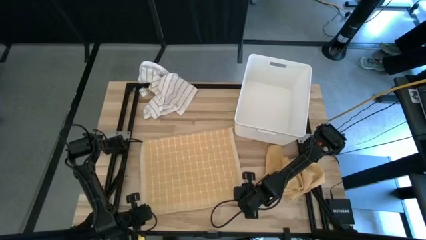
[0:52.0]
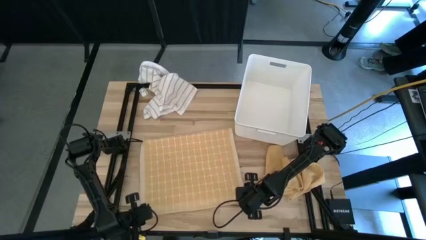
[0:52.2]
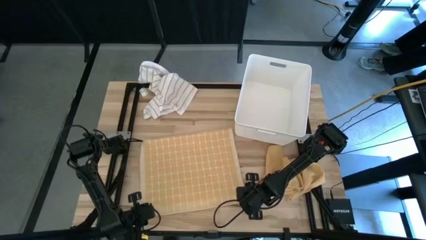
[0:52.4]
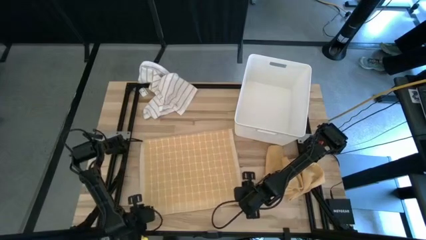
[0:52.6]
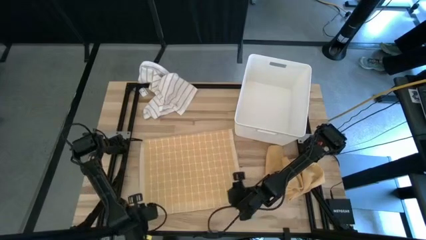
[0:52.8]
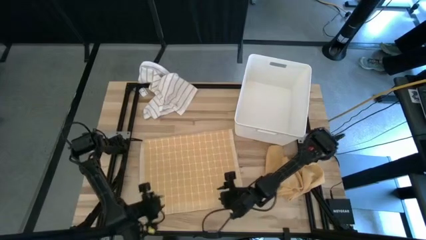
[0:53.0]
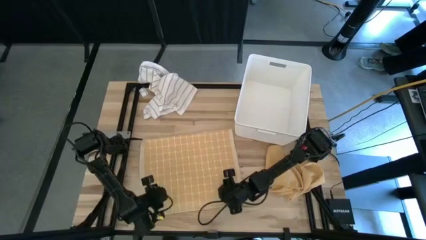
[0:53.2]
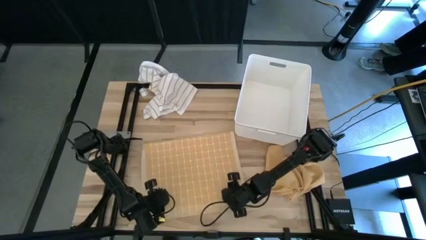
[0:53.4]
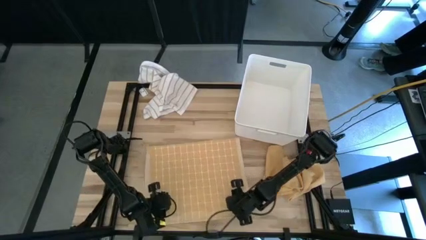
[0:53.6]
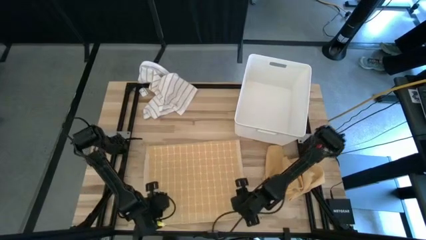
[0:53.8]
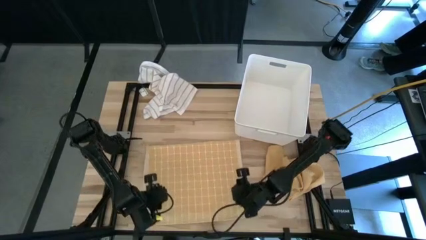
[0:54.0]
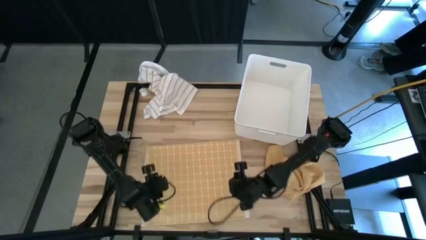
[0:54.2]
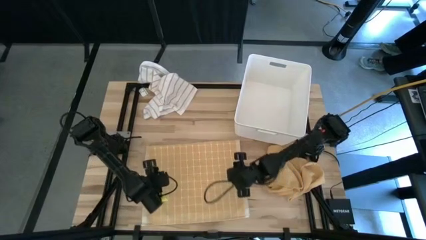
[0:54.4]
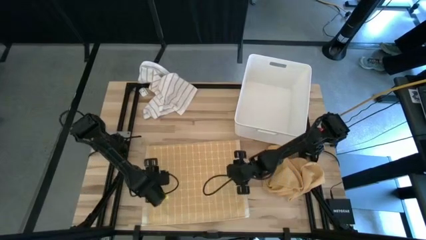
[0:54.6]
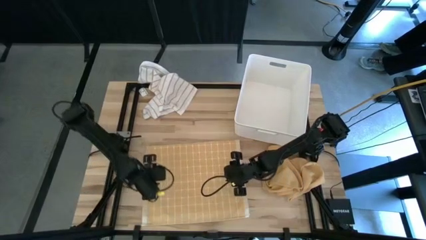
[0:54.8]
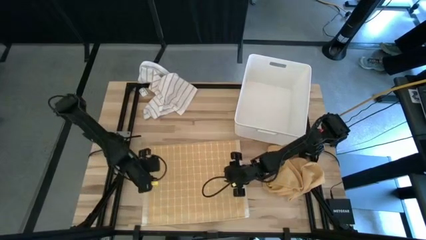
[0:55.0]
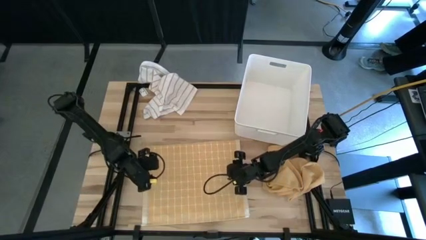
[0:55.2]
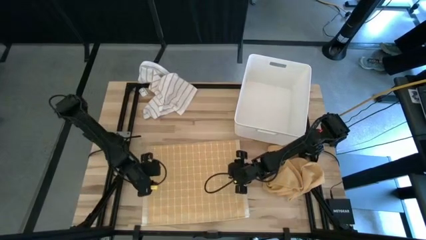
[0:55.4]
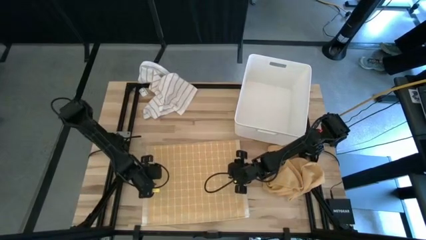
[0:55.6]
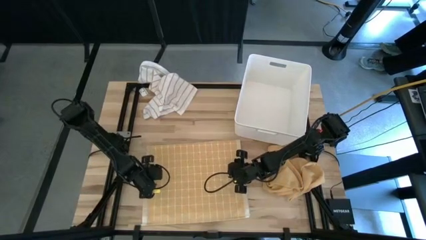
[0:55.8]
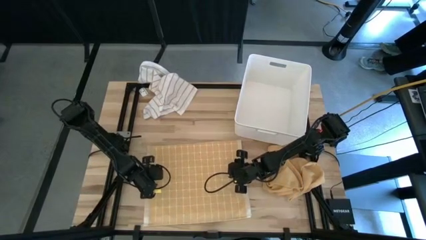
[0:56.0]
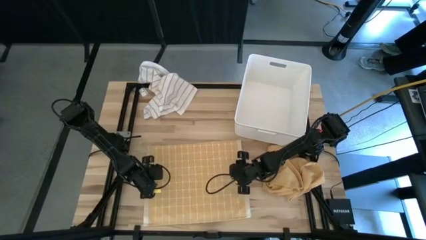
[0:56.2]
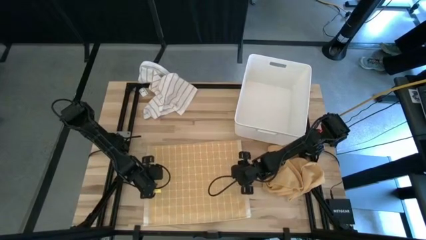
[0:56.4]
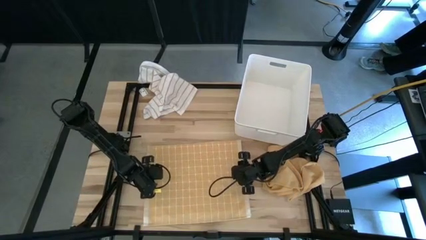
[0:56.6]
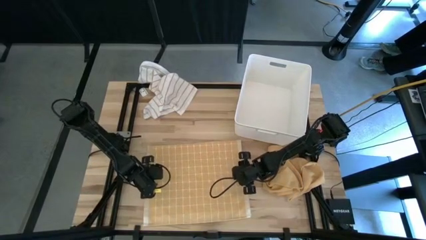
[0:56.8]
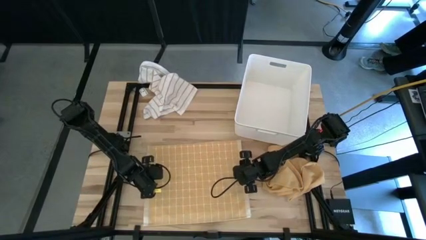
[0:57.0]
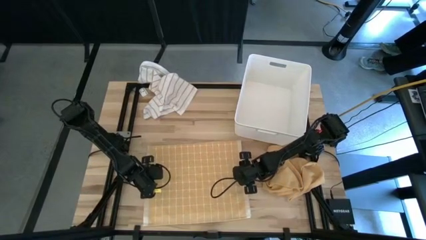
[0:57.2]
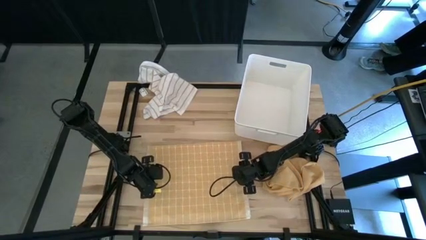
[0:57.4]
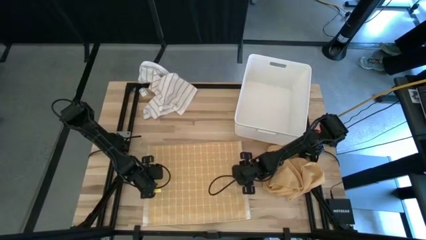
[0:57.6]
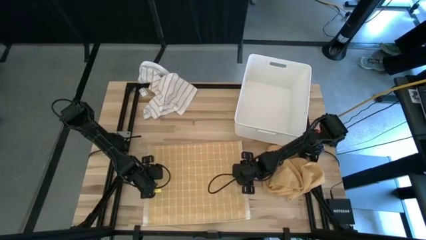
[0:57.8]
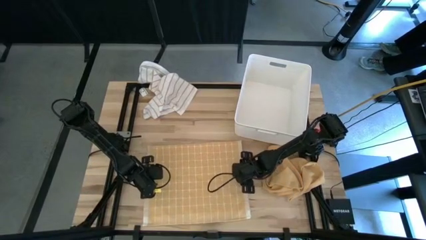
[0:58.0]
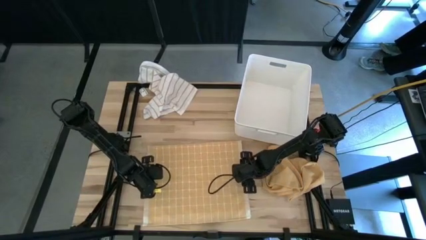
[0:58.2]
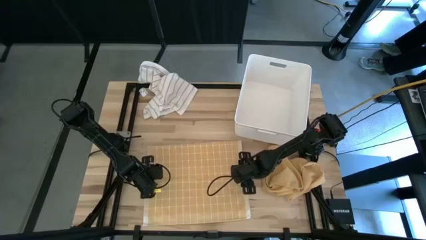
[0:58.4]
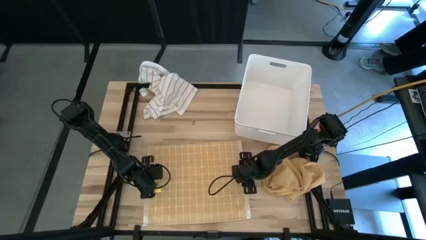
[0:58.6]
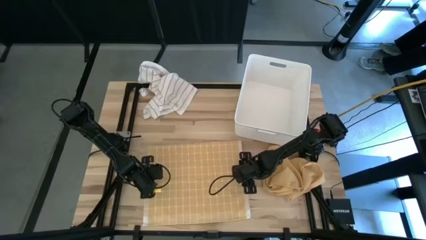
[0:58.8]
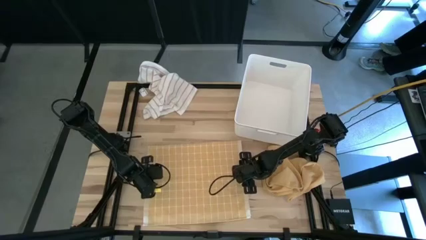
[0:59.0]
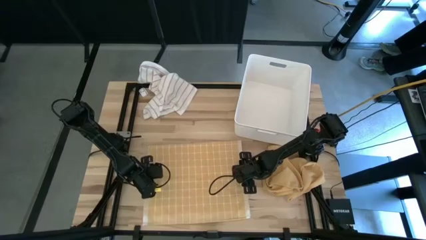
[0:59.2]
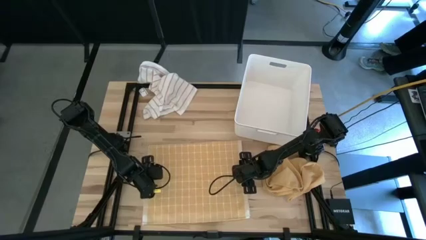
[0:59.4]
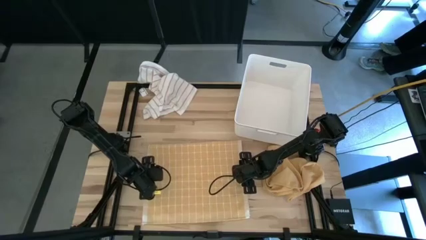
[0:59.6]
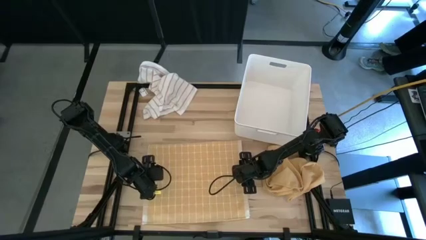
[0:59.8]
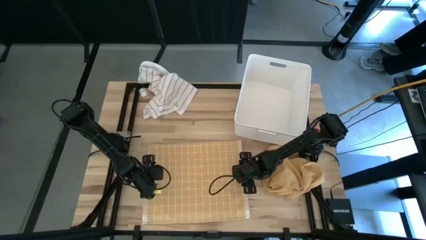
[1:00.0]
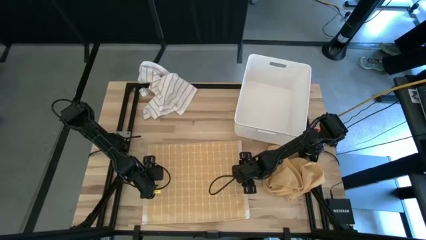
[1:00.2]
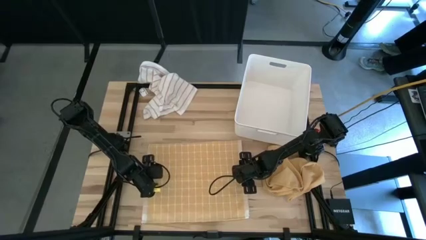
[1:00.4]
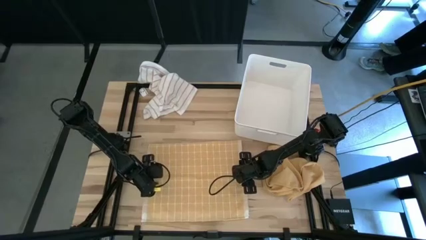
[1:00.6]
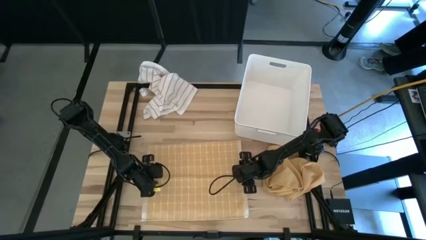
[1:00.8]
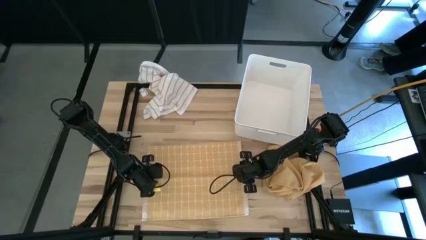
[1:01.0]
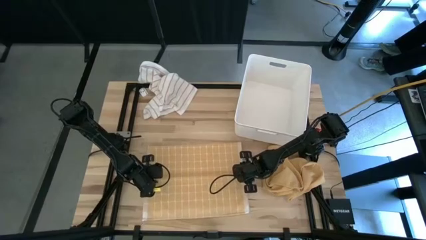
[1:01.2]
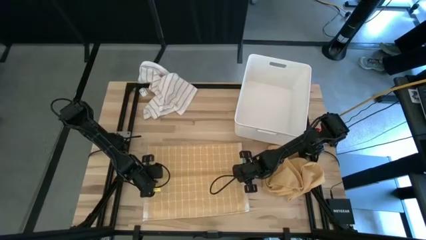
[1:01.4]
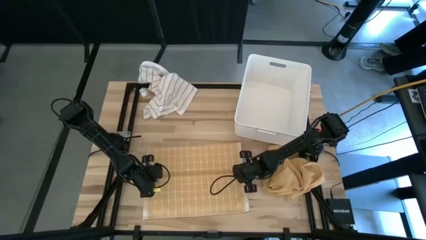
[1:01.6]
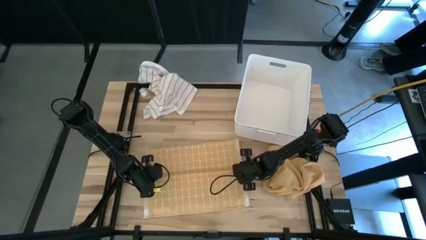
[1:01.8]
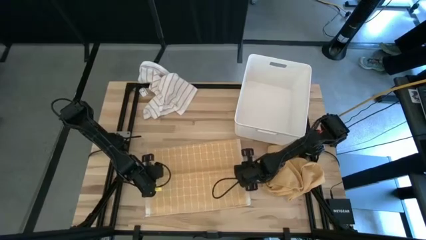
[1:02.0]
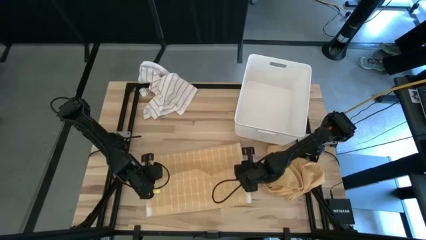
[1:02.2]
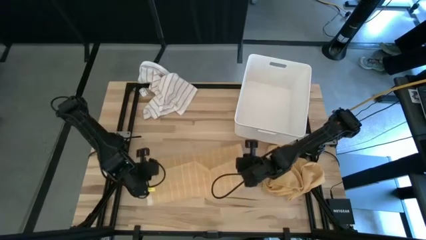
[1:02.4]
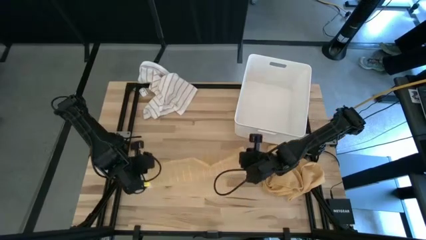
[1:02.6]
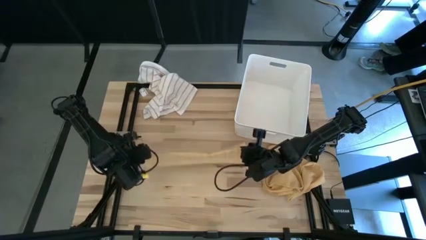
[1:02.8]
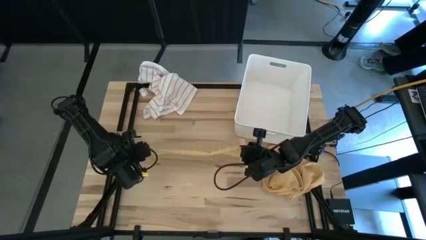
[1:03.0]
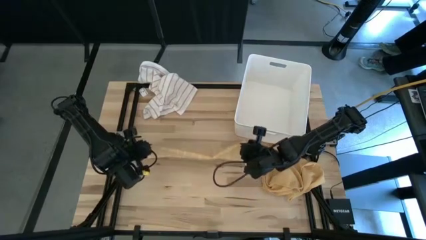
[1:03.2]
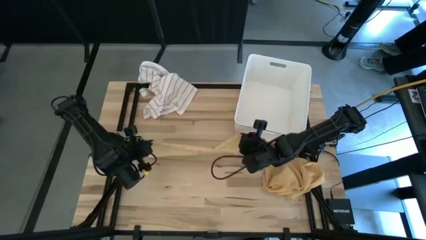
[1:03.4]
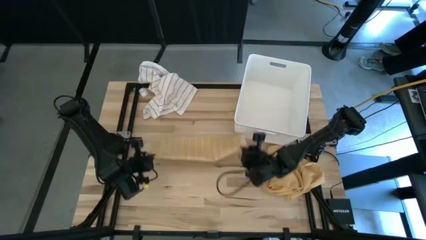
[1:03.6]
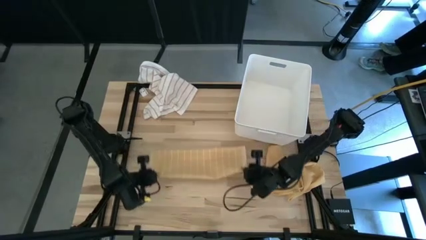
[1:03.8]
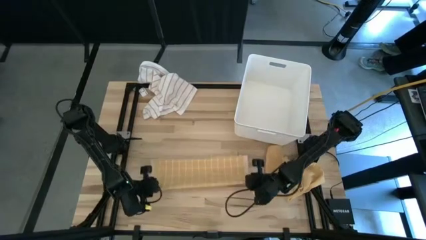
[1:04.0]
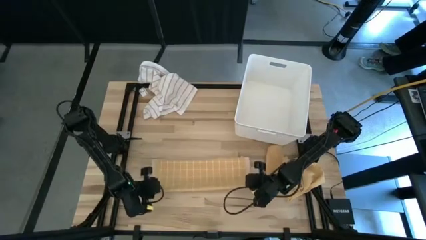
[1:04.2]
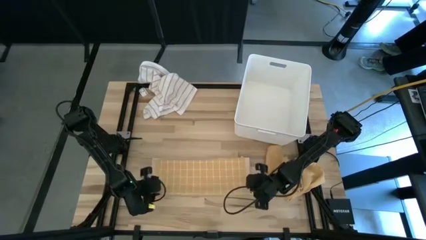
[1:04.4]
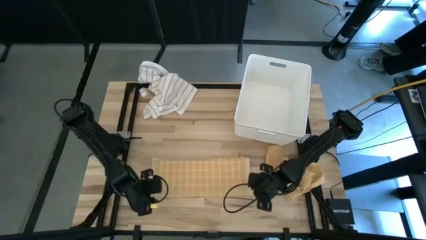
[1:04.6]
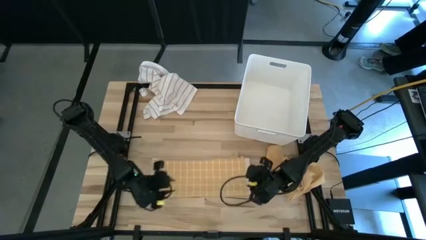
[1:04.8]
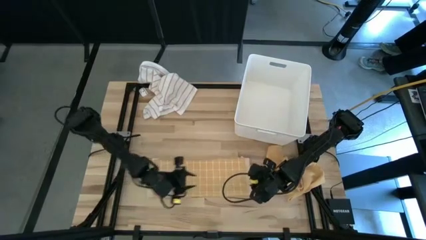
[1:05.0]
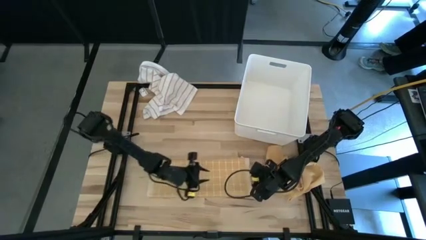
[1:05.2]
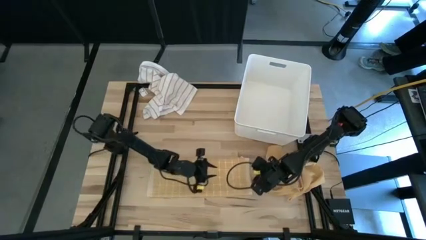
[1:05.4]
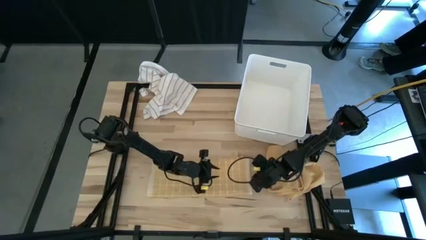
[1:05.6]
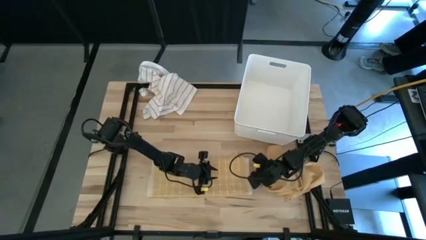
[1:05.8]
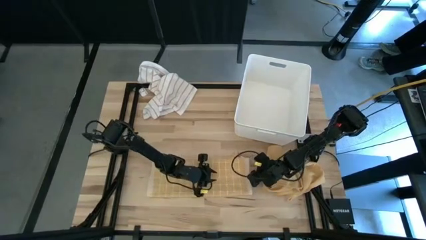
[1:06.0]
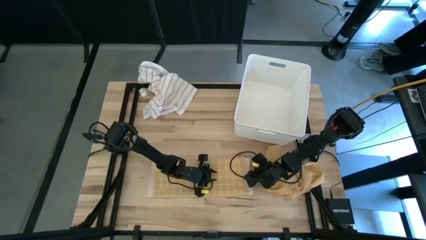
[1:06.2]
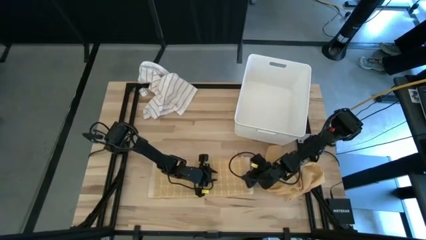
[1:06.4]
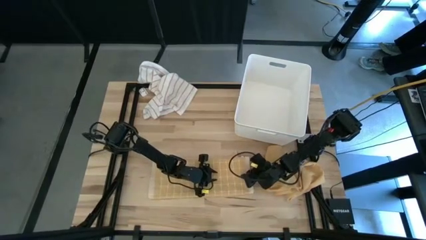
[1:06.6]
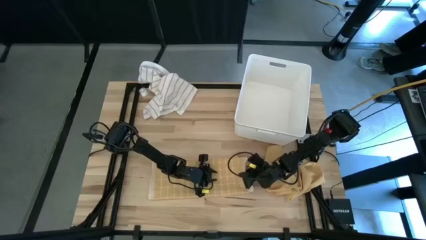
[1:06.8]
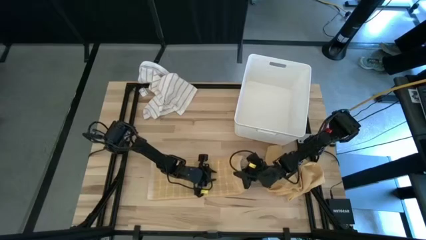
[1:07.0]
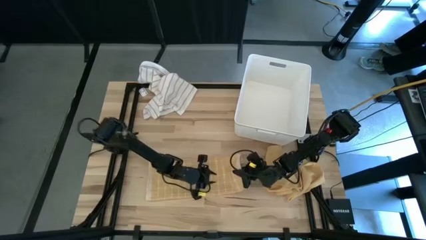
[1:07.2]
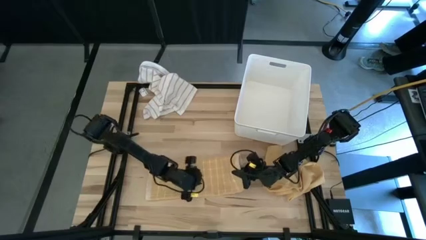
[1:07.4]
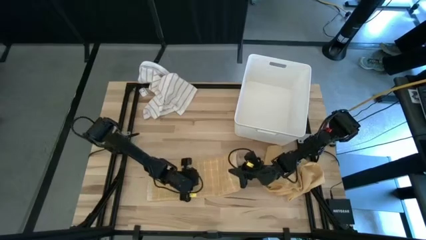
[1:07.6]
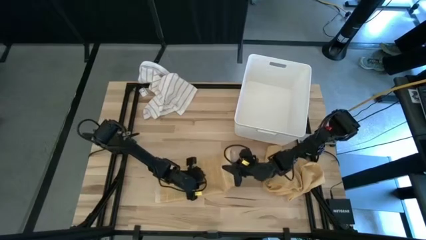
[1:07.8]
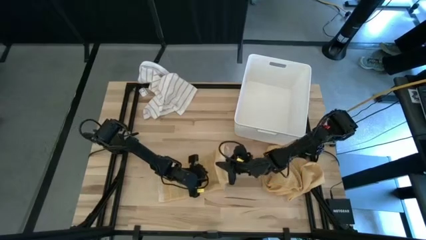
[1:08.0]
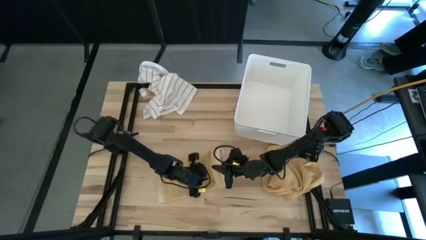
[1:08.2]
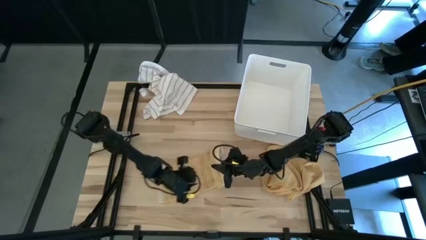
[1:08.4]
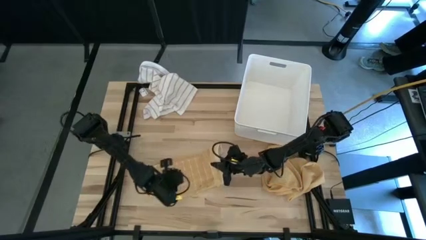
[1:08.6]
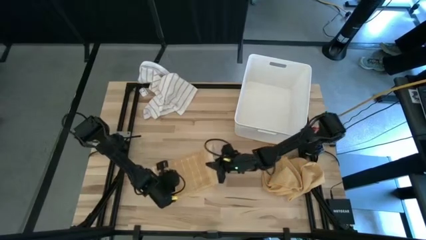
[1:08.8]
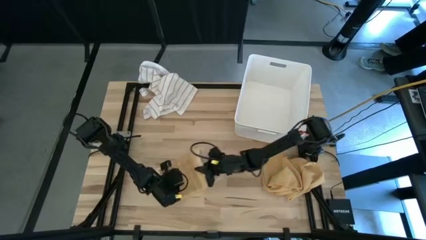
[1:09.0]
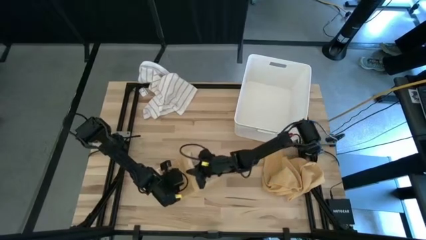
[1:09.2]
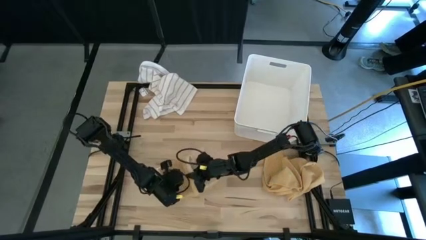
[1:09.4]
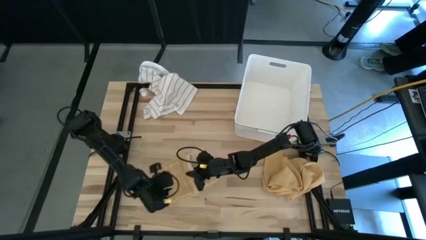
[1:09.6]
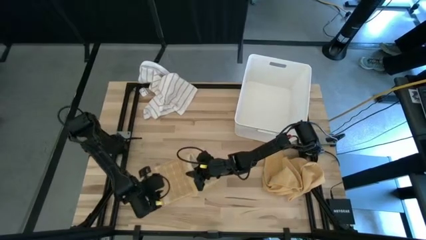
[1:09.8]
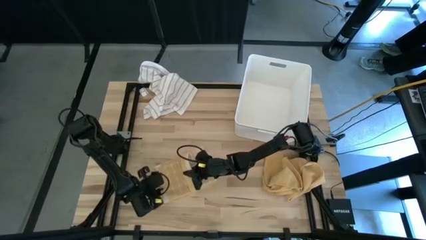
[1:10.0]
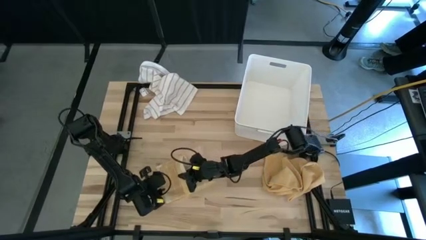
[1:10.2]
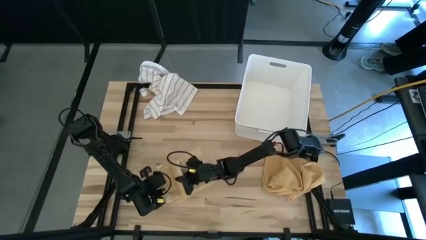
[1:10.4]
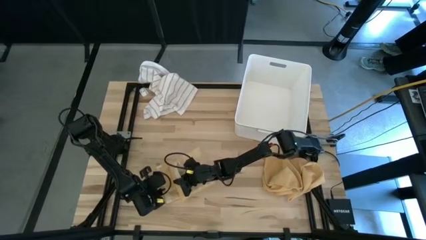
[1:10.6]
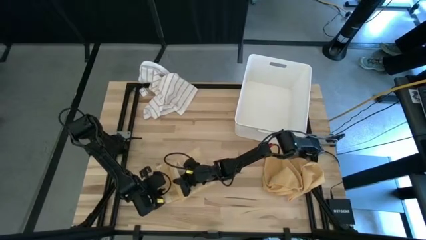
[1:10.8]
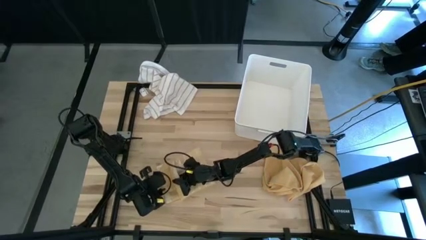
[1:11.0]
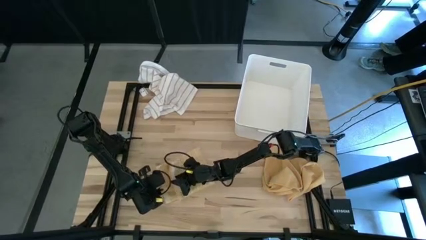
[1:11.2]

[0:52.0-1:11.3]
Task: Fold towel
Fold the yellow patterned towel
